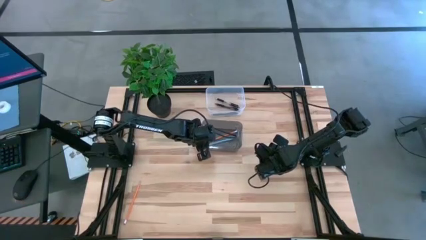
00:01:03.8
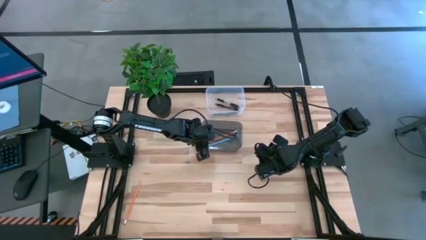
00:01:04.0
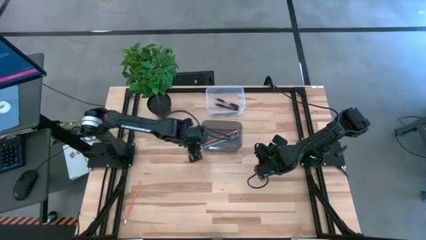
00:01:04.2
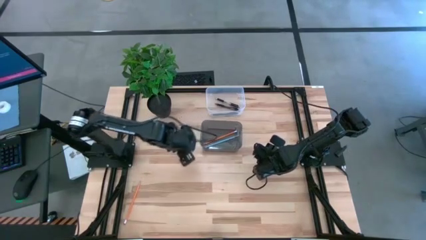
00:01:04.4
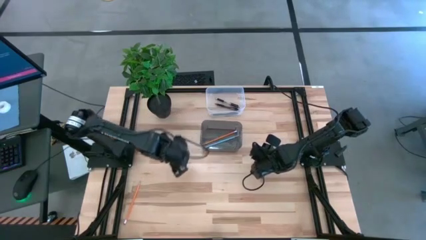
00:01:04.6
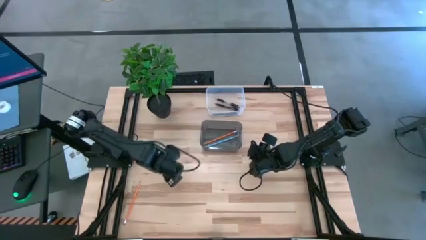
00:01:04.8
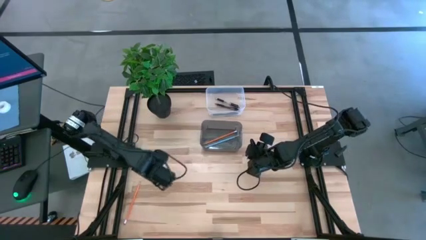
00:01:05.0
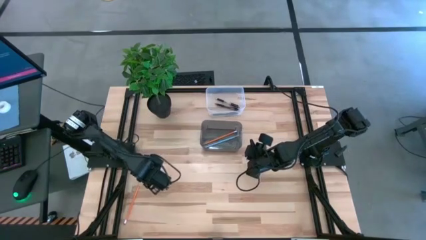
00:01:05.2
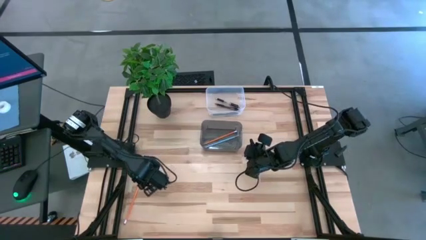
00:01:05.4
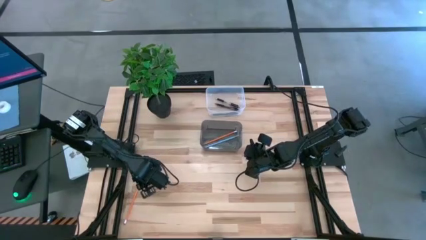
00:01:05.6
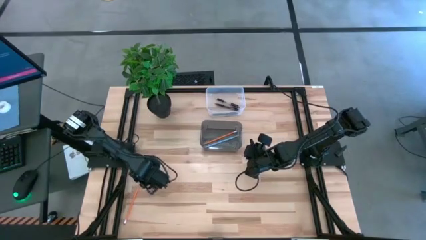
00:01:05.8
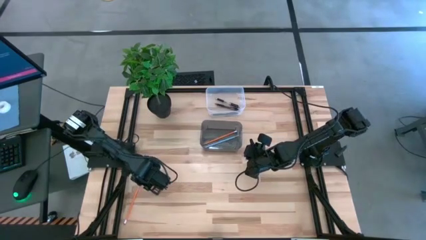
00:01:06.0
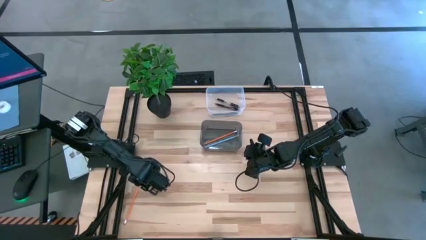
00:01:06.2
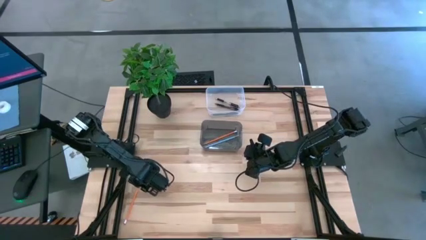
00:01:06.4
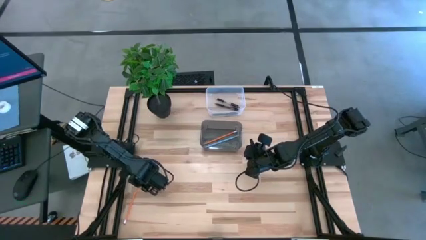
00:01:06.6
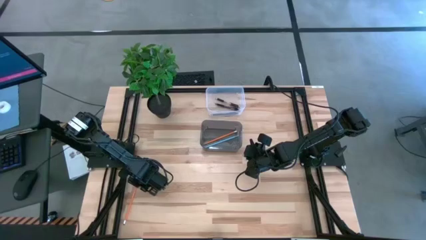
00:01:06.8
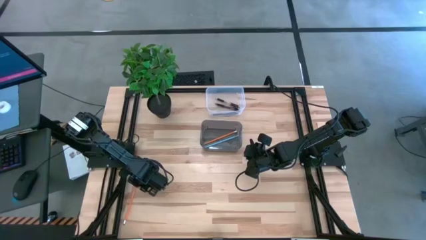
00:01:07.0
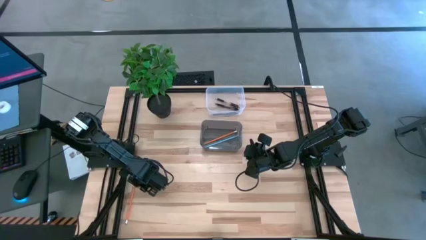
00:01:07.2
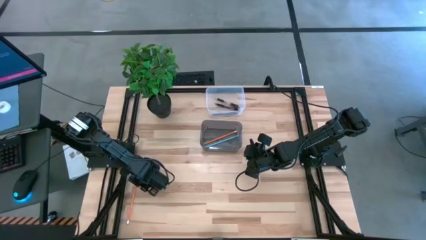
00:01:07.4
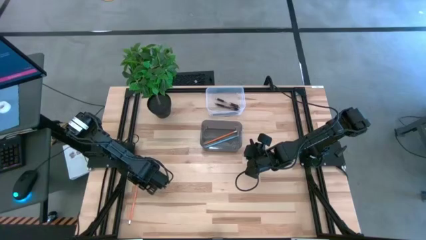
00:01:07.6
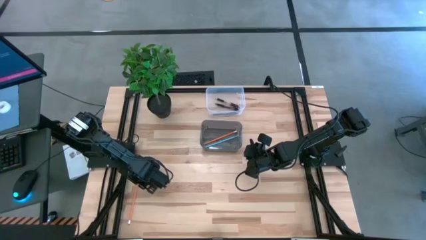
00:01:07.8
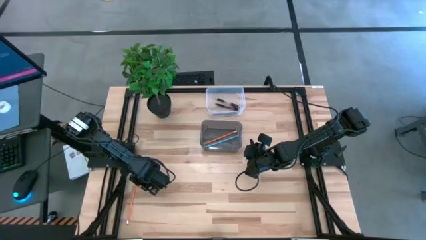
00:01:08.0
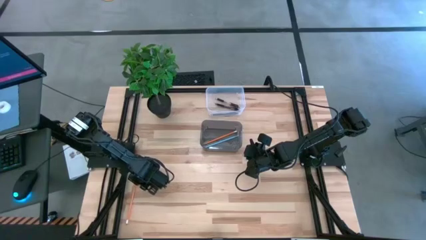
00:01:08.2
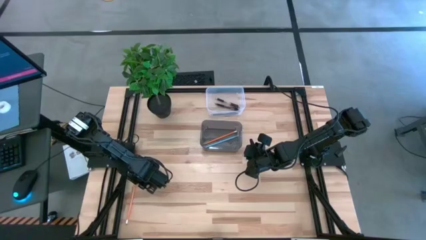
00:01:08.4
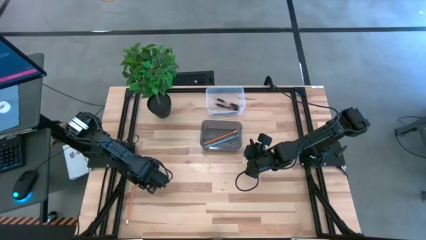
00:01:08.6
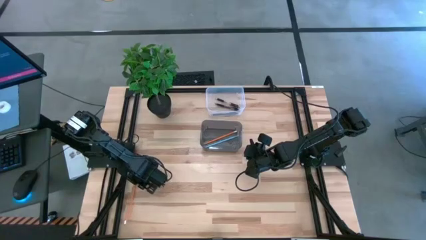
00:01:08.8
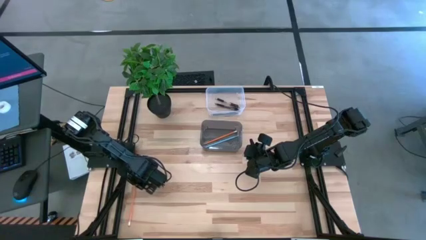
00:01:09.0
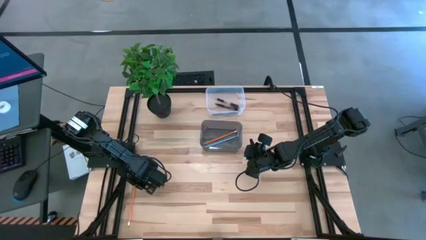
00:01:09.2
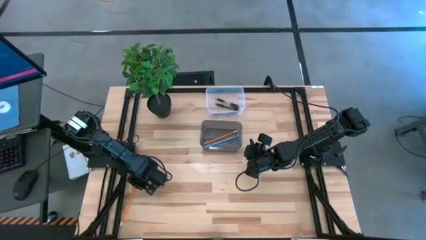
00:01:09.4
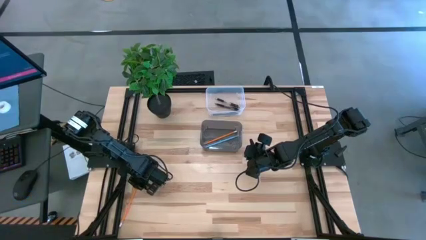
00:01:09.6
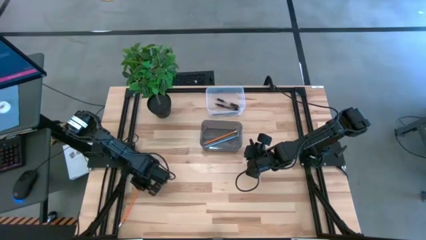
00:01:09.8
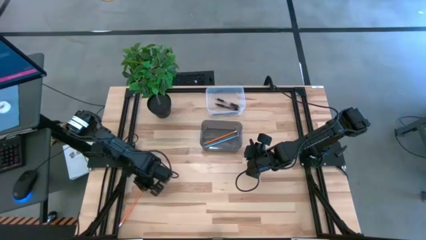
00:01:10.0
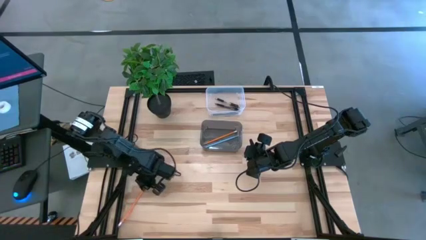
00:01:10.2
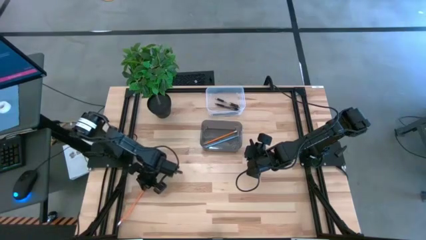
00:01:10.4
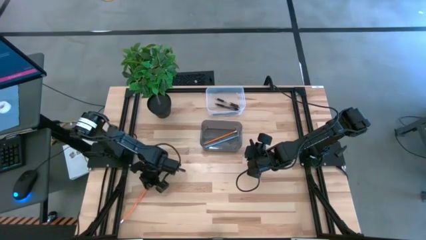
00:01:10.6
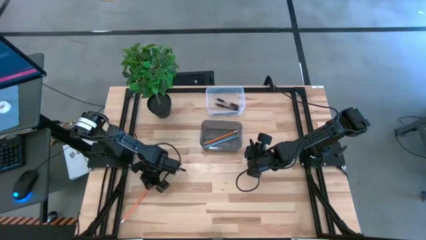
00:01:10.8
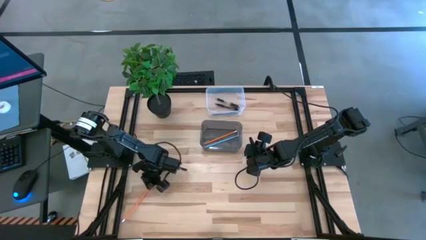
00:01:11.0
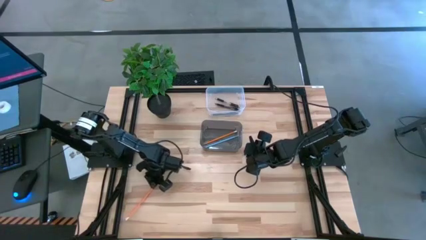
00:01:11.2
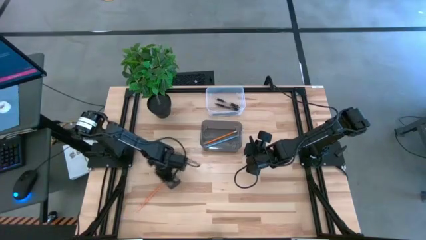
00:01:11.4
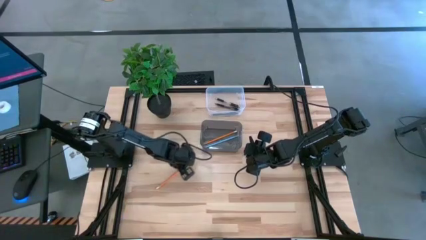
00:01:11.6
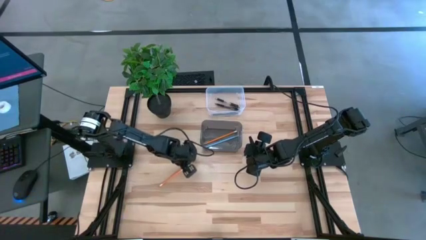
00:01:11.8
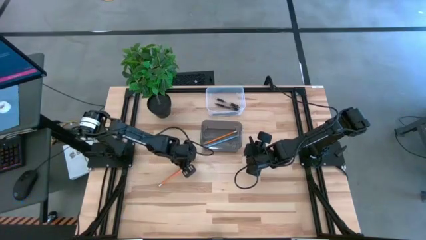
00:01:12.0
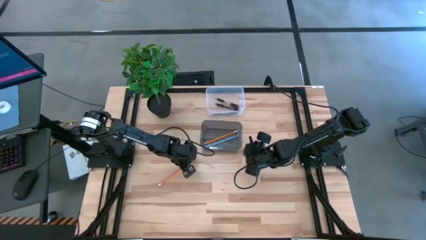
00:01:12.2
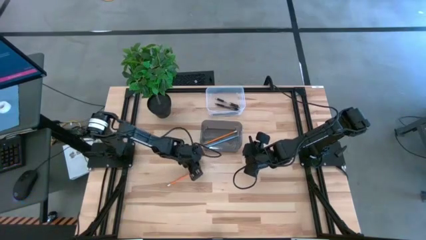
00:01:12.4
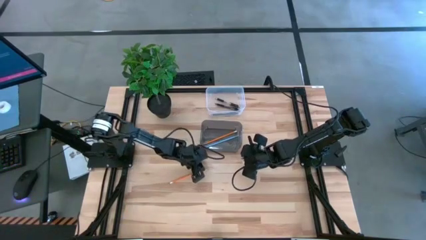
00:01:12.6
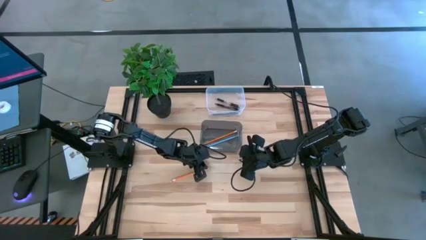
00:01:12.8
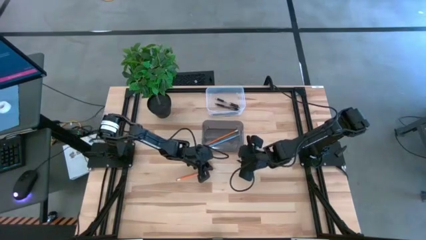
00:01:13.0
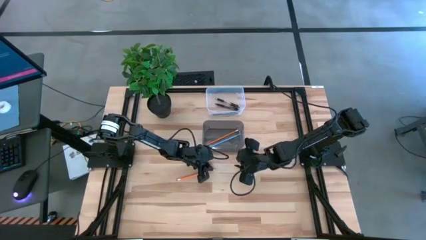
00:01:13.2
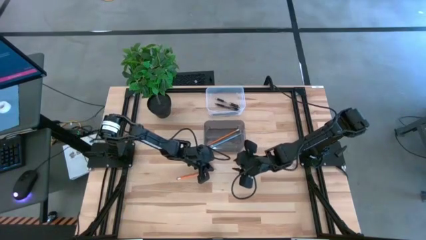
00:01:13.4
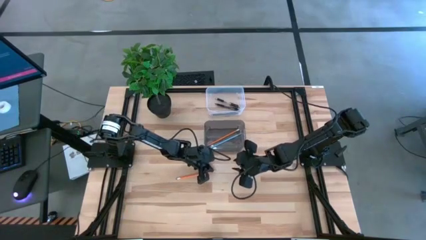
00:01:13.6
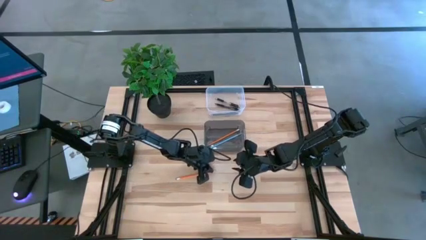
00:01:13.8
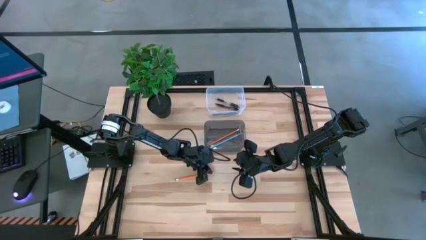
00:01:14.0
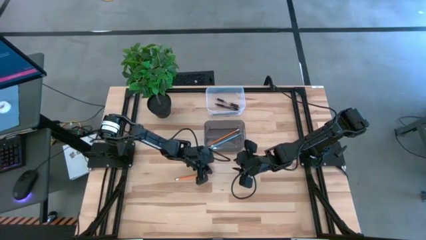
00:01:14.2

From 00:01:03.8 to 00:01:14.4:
Task: Sort pens & pencils
Put the orange pencil into the black bin

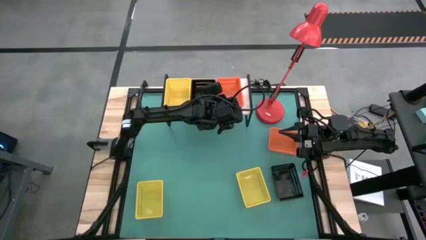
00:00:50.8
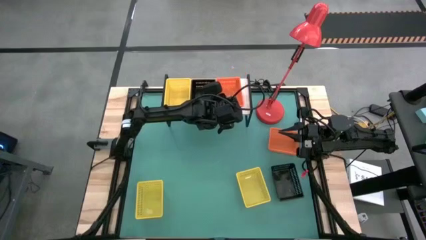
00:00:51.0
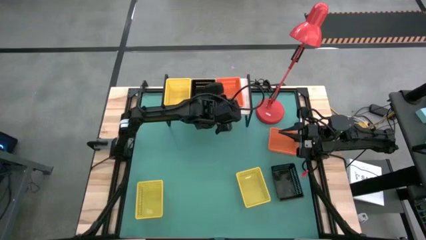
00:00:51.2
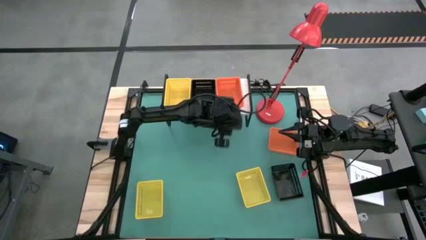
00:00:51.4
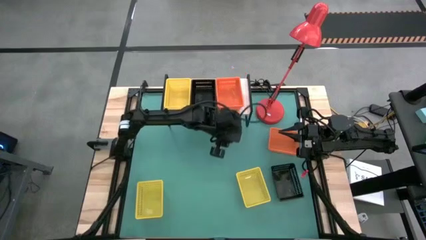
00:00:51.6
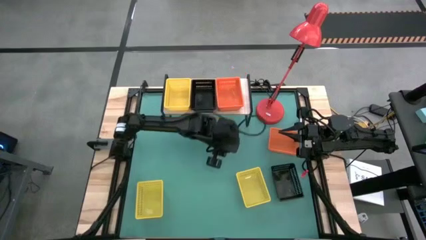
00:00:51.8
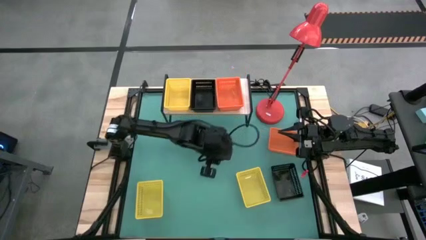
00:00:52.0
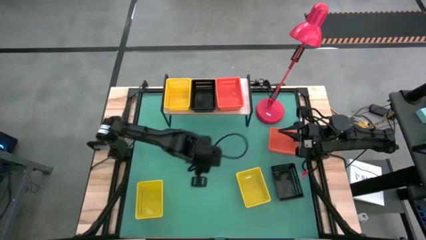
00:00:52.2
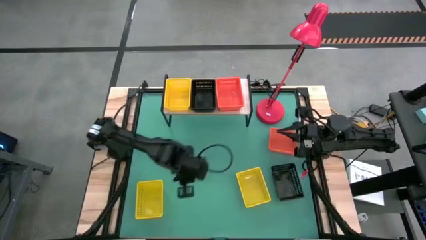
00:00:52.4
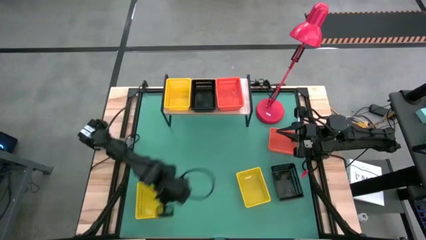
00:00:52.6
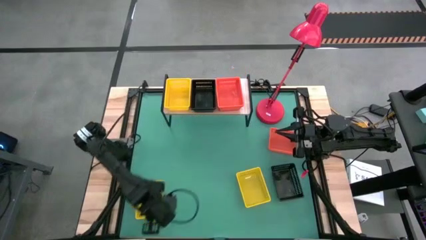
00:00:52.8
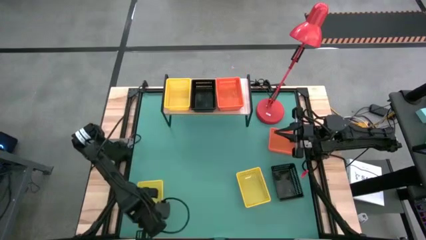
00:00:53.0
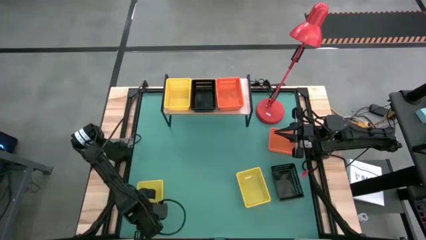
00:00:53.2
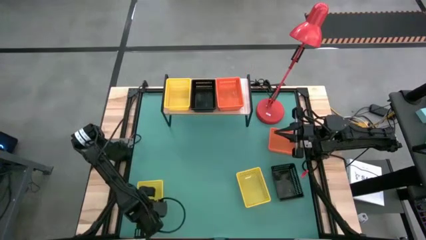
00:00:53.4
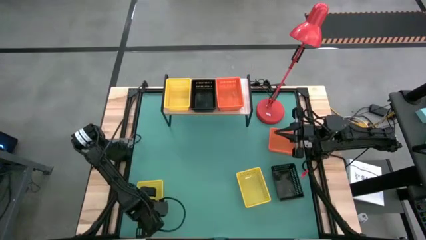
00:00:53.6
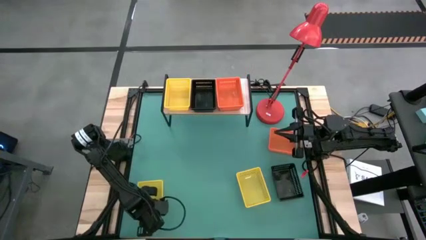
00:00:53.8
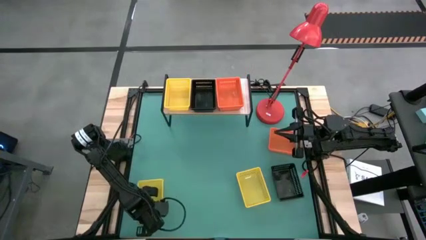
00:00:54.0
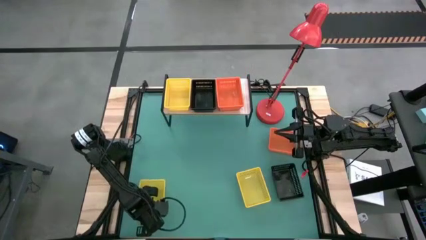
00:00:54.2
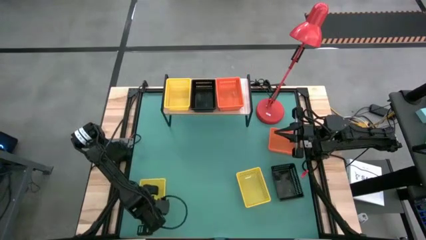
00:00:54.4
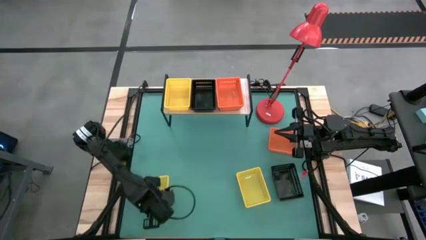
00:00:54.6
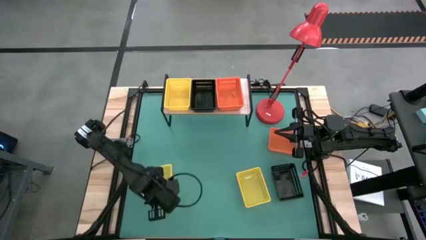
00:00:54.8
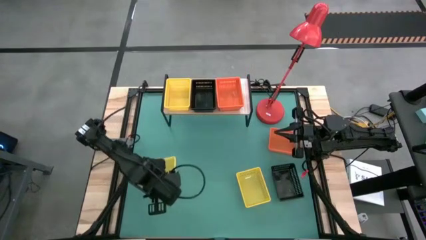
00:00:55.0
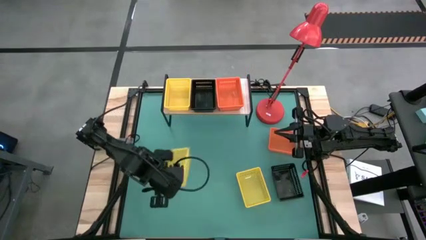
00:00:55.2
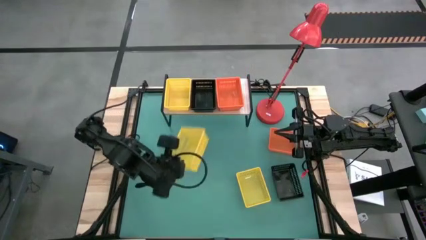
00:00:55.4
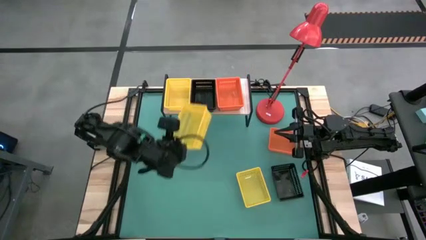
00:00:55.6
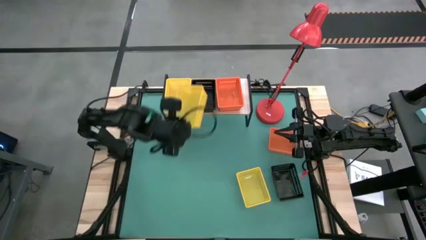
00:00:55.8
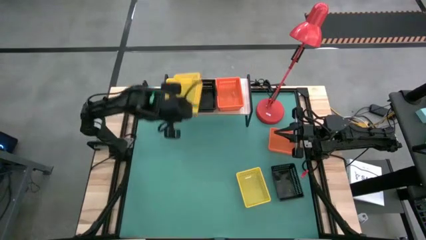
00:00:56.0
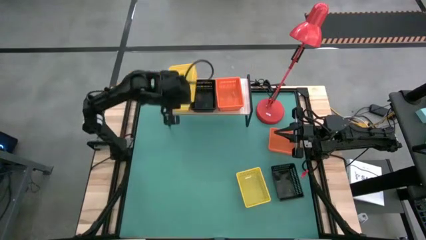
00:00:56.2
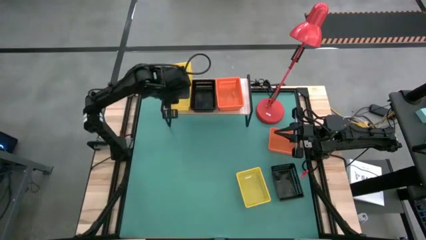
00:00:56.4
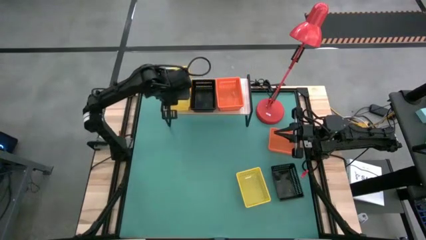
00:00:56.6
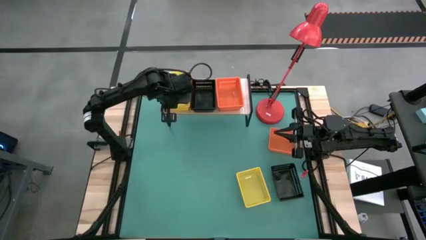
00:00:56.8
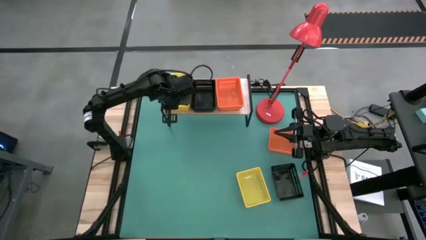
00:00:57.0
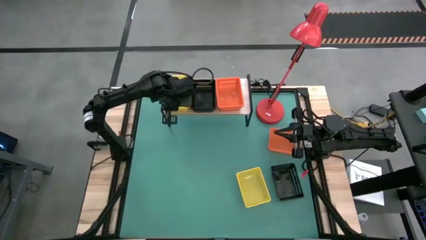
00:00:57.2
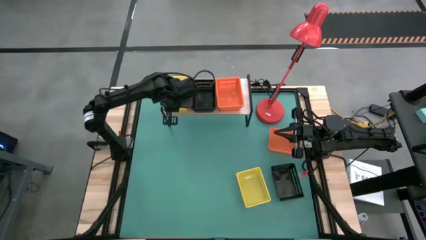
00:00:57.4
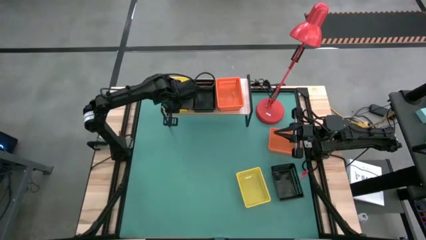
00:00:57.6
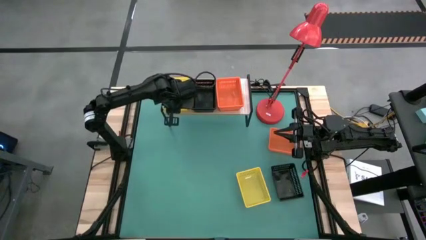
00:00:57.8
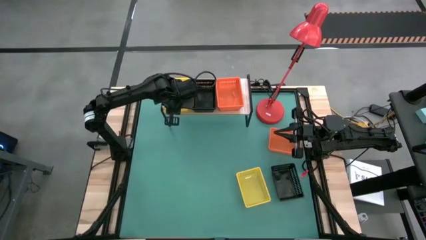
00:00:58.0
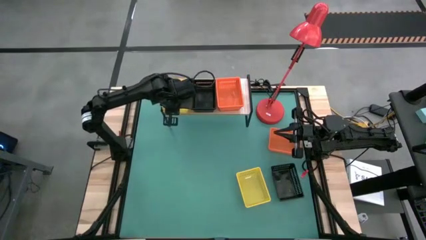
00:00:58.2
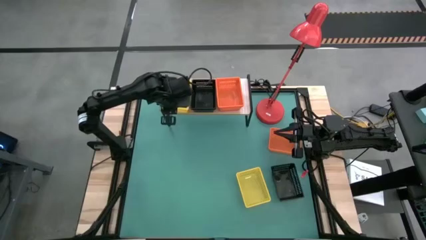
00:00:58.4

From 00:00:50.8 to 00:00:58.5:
Task: Stack baskets on shelf by color
Stack the left yellow bin on top of the yellow bin on the shelf
